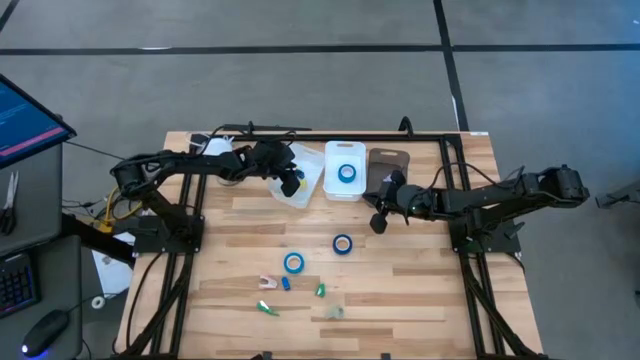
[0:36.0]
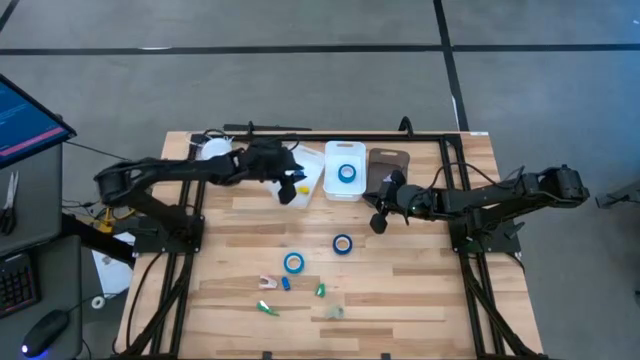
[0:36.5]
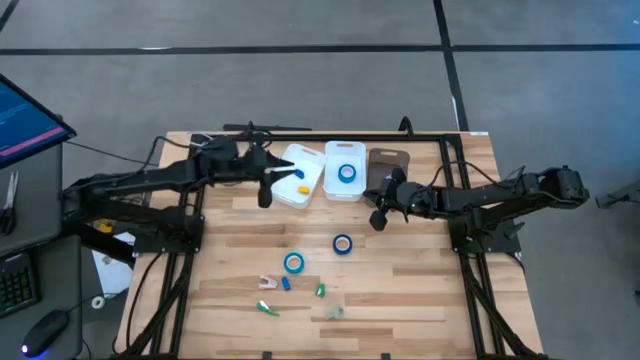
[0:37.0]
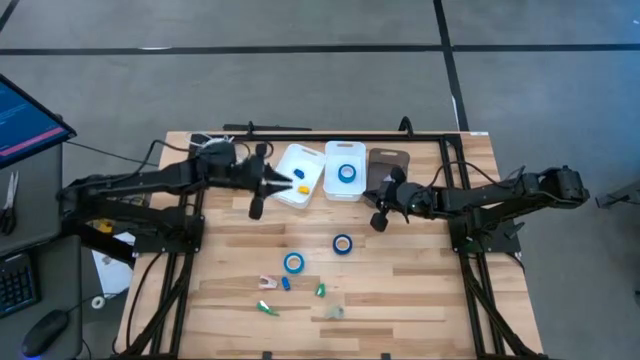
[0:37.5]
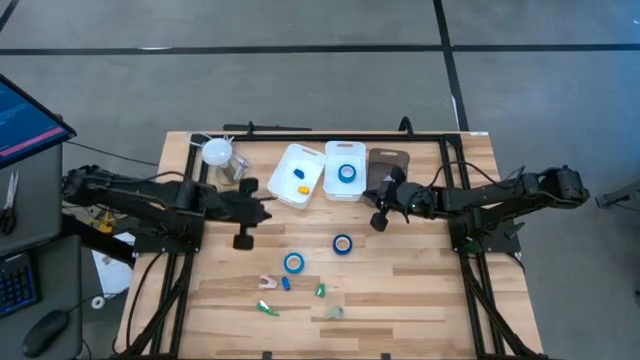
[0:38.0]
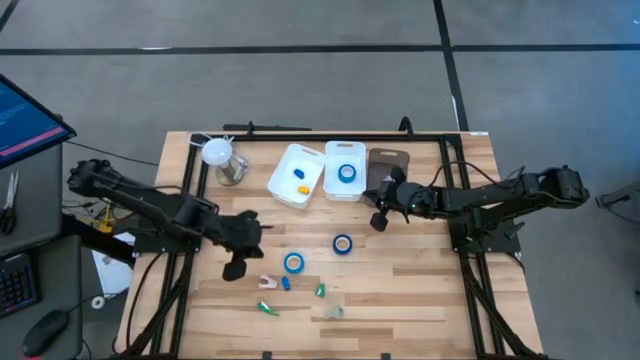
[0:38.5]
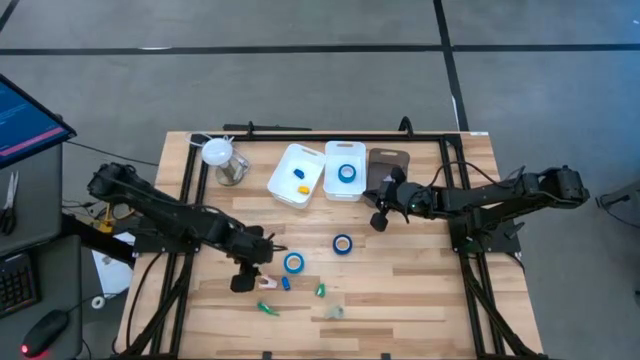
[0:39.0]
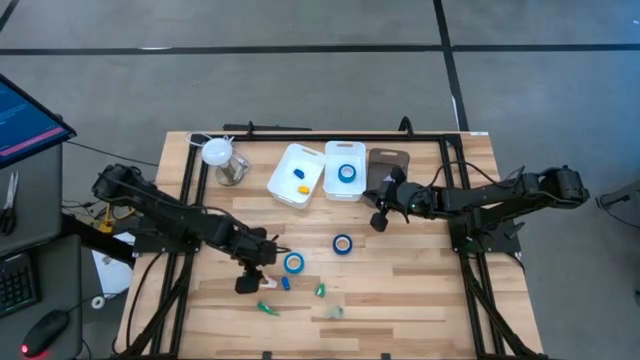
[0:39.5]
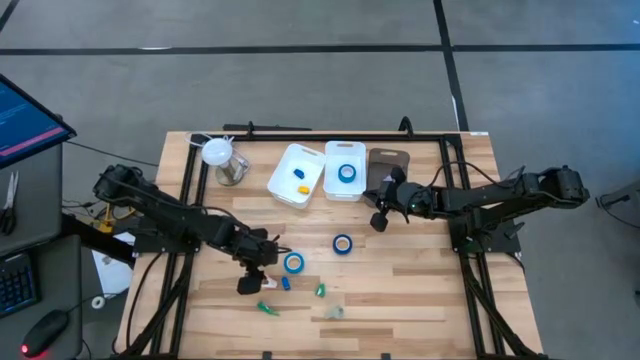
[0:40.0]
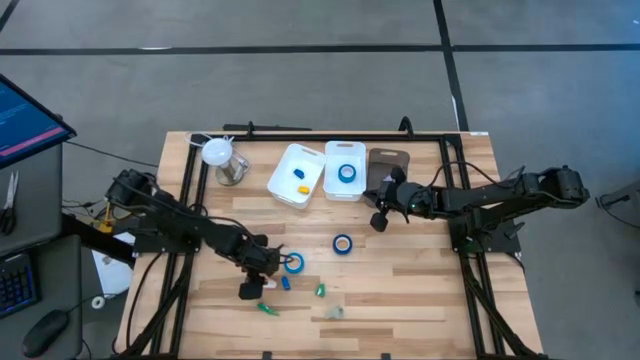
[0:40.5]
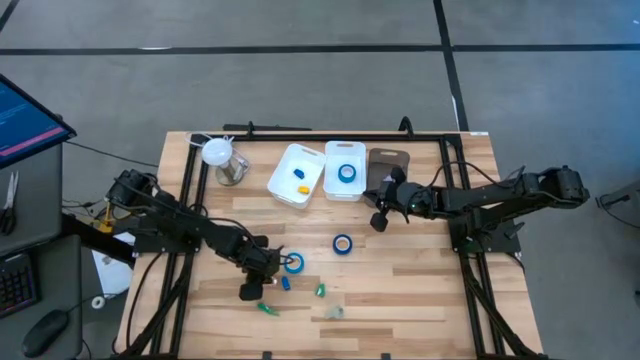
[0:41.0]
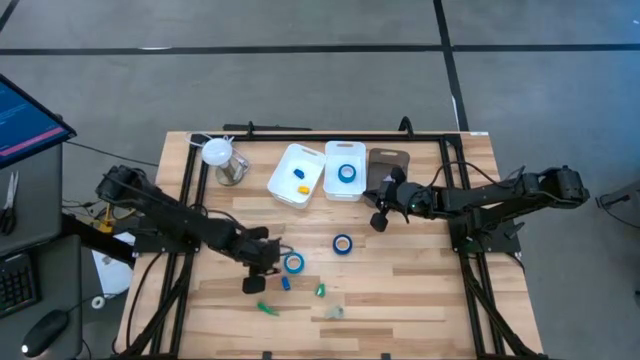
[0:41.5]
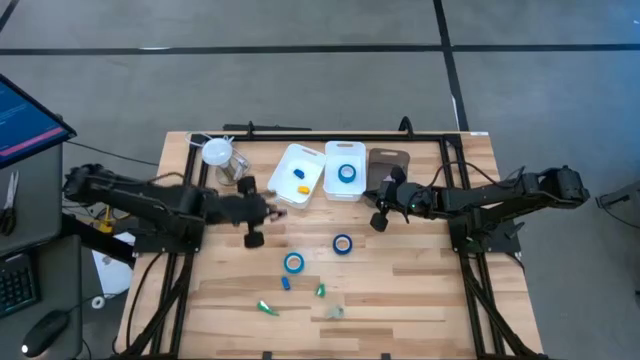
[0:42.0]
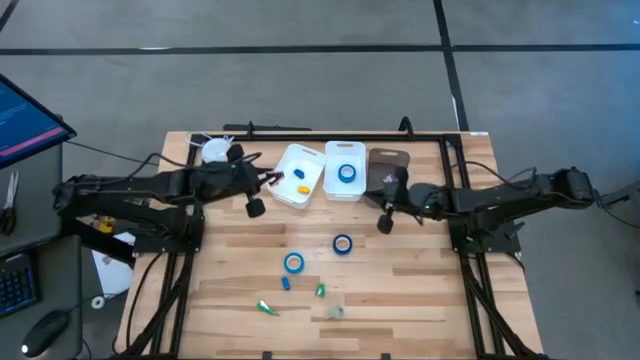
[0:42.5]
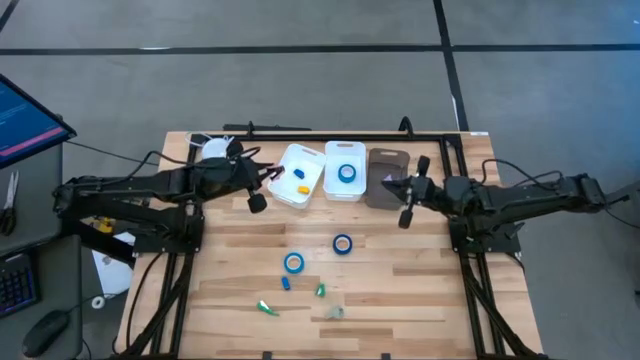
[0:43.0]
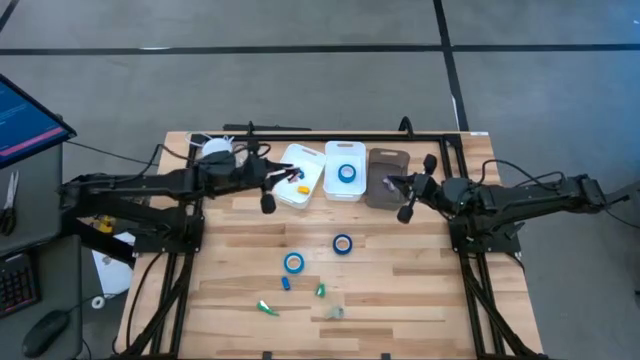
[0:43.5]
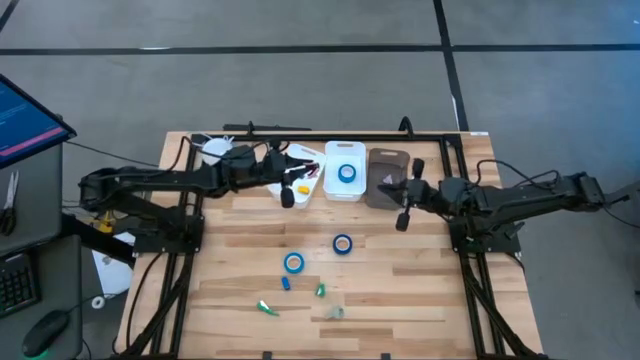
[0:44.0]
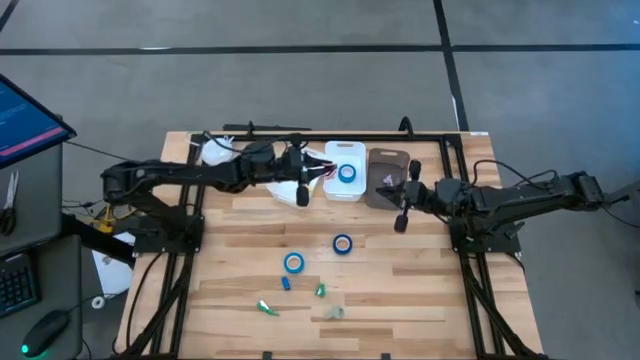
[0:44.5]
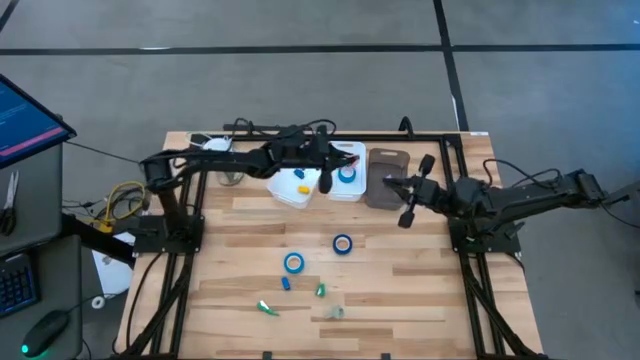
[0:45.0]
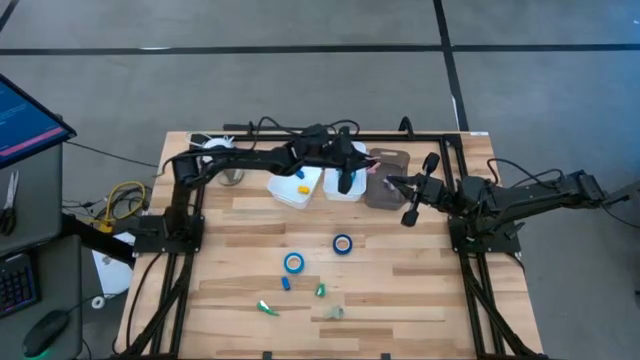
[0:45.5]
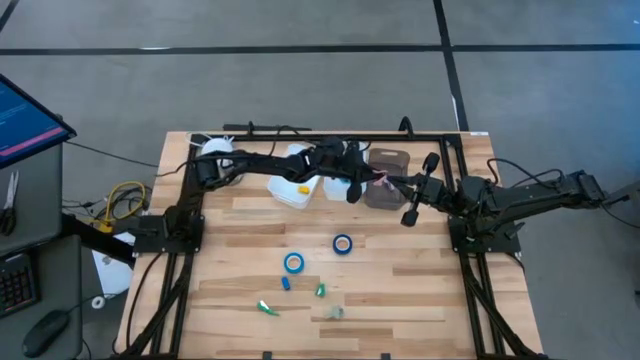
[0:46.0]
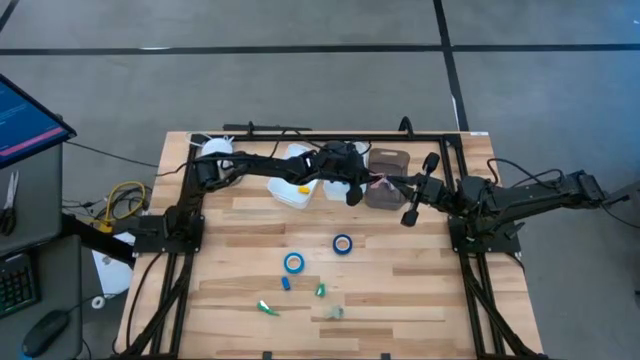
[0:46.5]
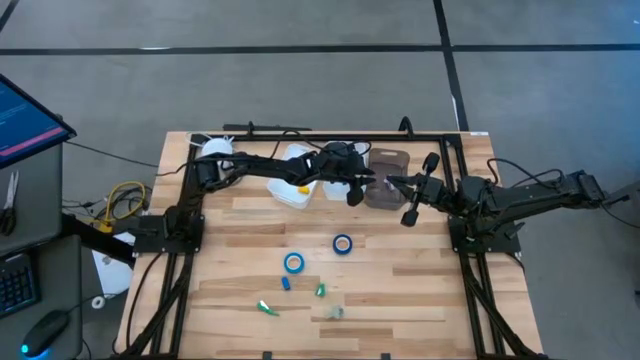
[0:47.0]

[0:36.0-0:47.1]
Task: Pick and place Stapler, Stapler remover, tape
Put the pink staple remover into the black bin

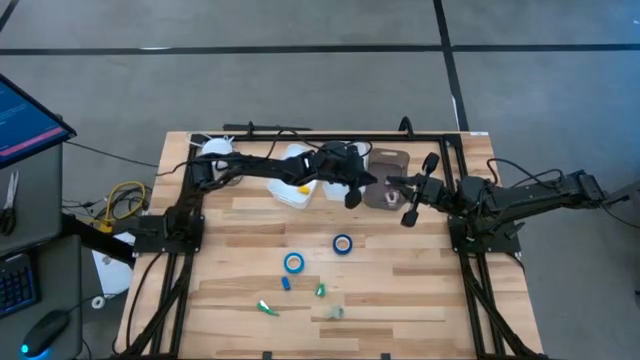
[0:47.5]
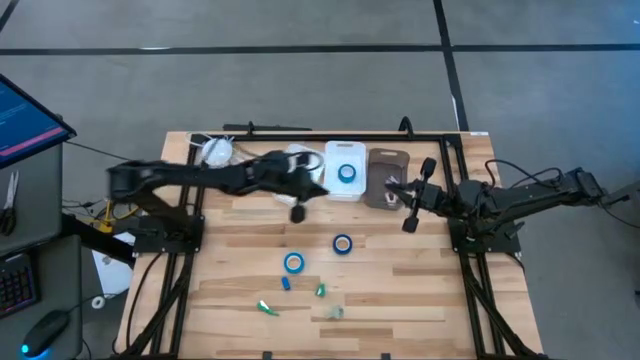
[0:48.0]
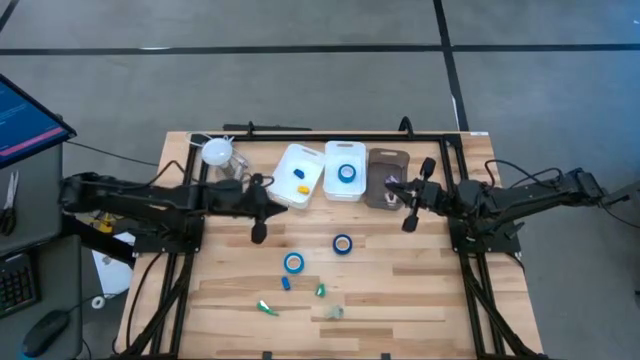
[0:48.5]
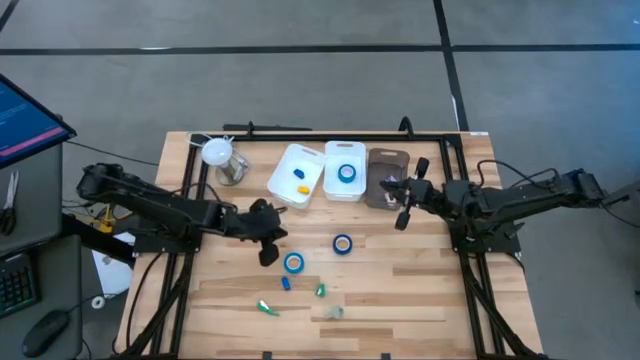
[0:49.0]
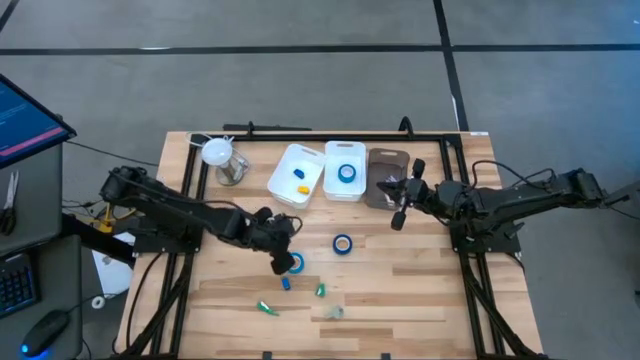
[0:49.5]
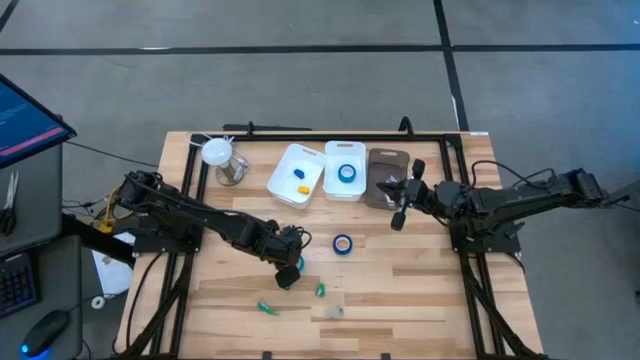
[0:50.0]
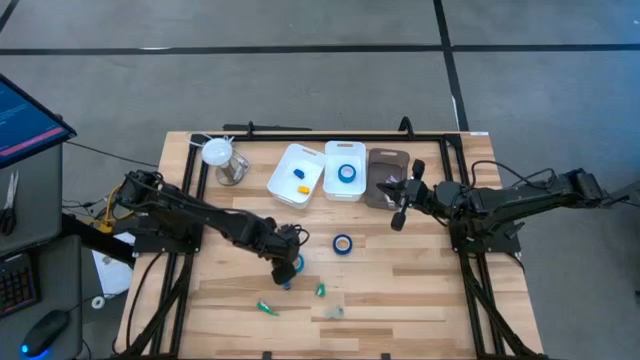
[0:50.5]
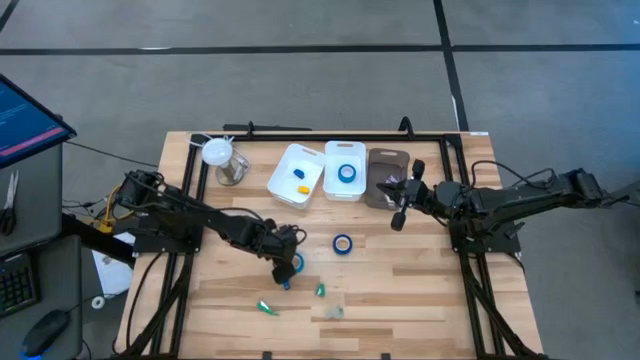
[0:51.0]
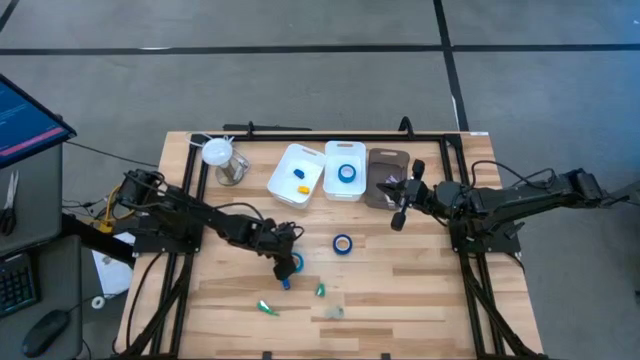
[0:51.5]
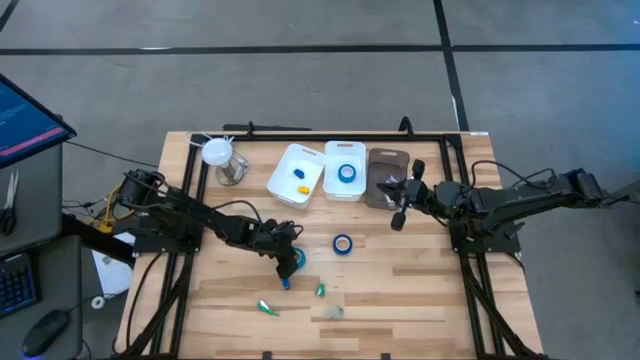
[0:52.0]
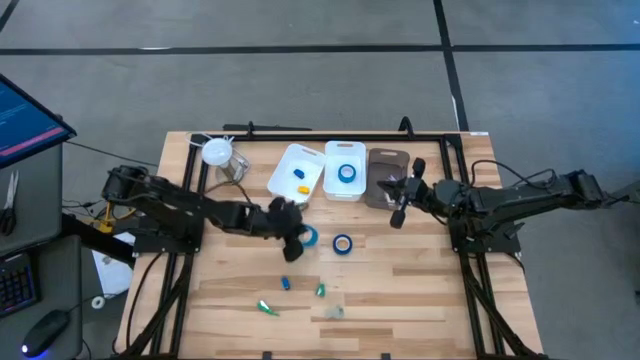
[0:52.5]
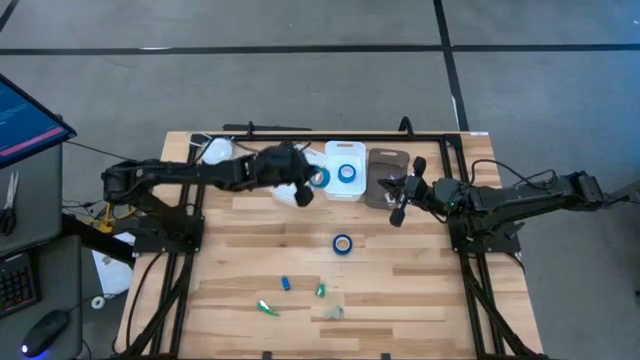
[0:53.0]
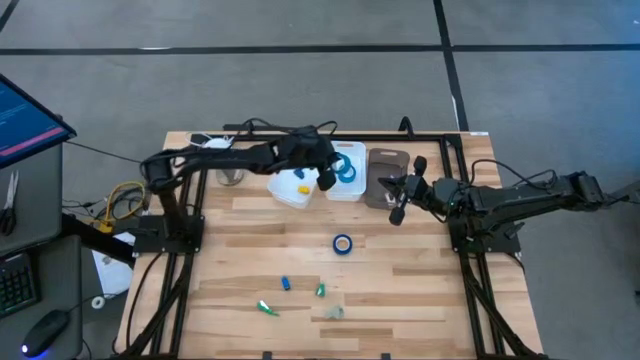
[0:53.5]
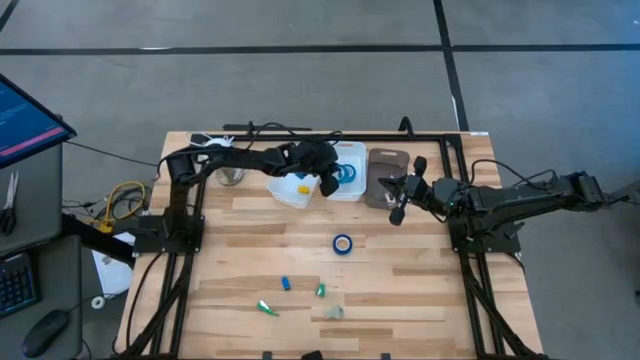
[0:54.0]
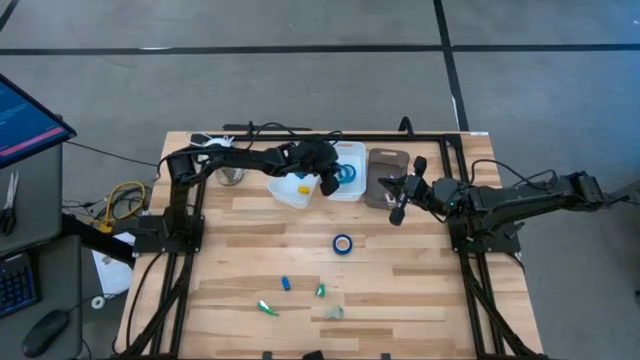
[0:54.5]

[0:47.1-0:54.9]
Put the left light blue tape into the right white bin

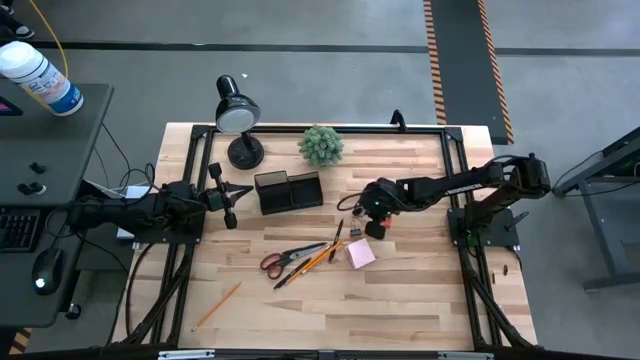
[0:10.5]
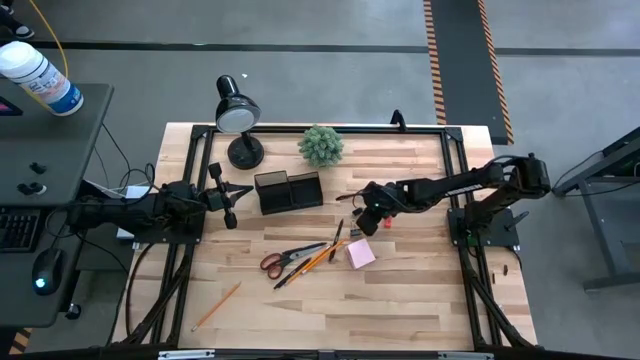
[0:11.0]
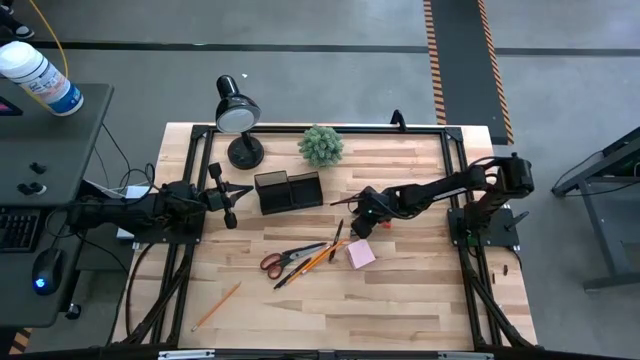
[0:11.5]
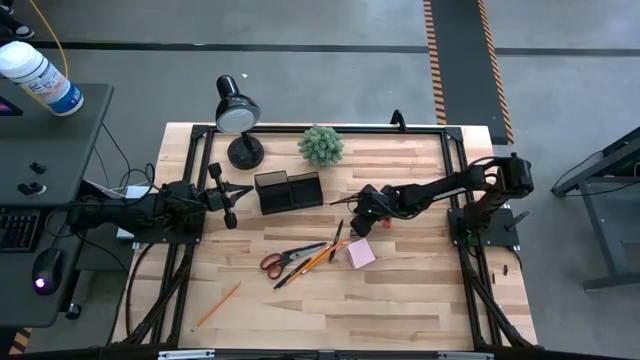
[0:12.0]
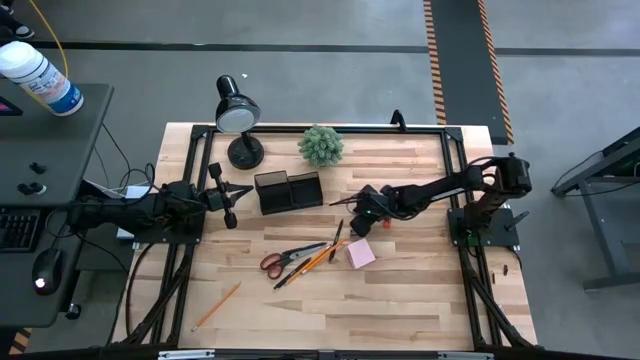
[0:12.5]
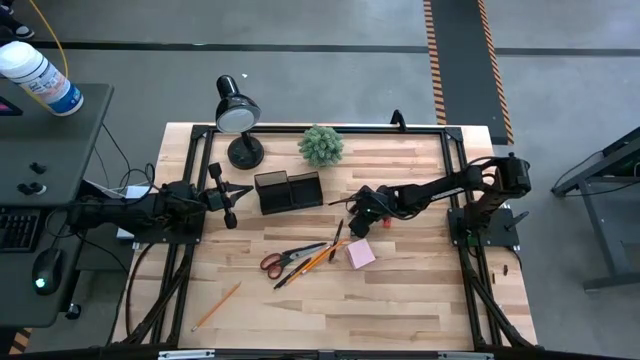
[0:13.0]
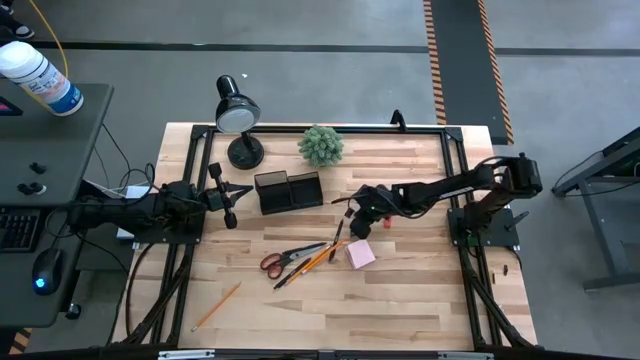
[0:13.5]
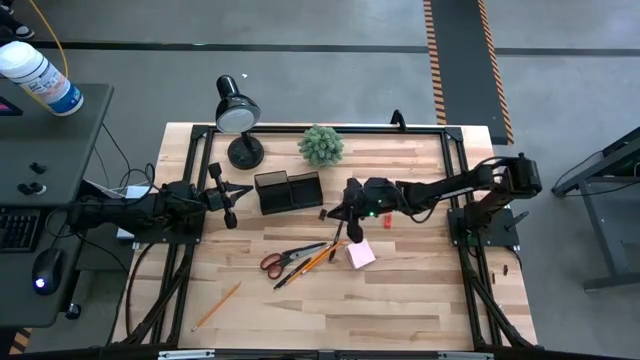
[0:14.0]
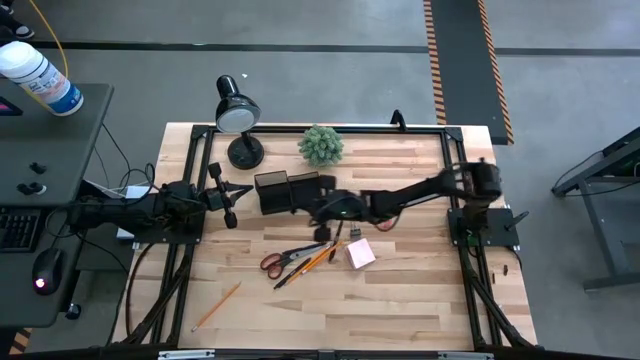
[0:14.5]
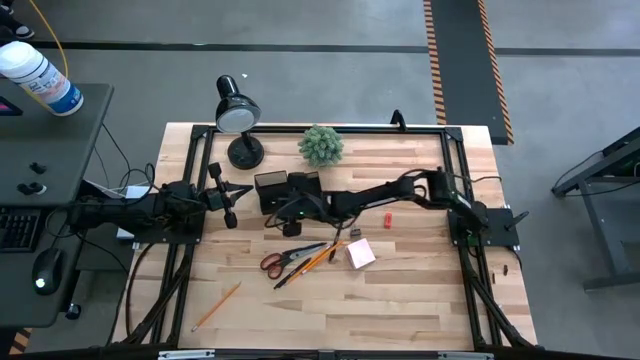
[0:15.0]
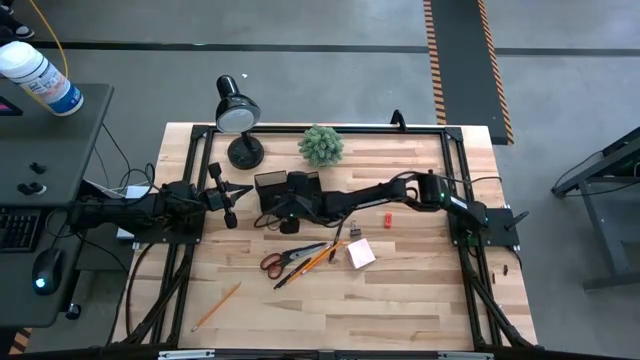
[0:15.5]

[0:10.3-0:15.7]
Task: Pick and place office supplies into organizer
Put the right clip binder into the desktop organizer
